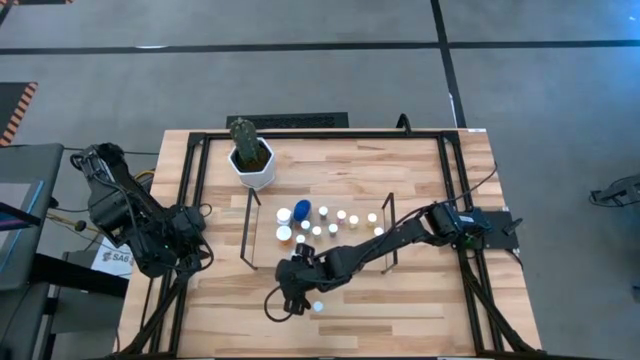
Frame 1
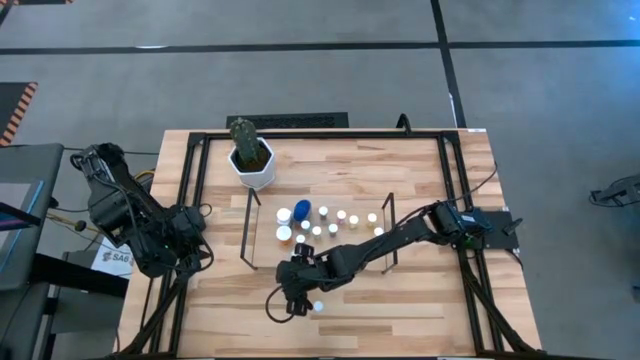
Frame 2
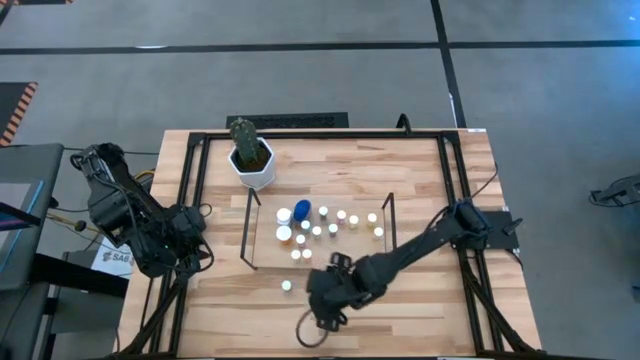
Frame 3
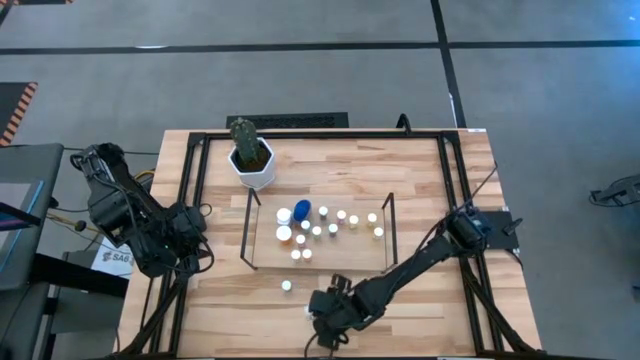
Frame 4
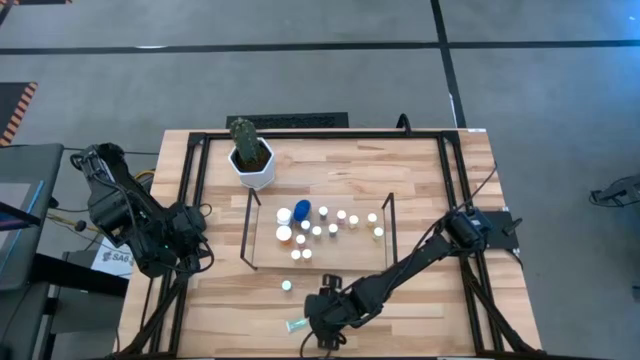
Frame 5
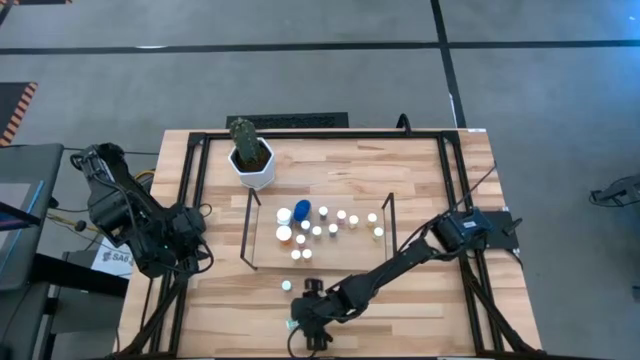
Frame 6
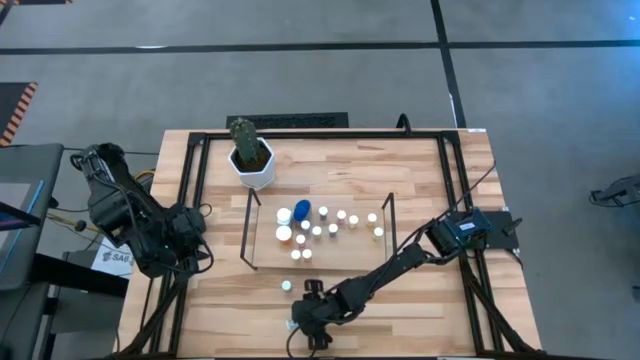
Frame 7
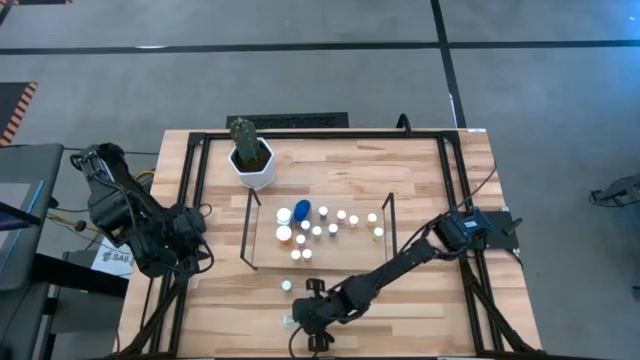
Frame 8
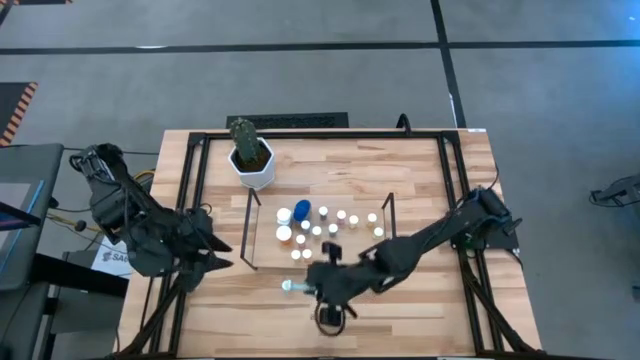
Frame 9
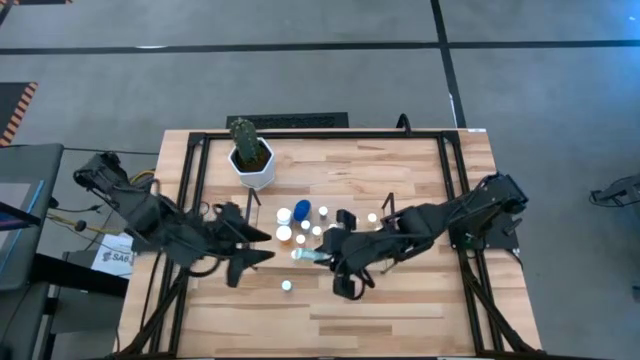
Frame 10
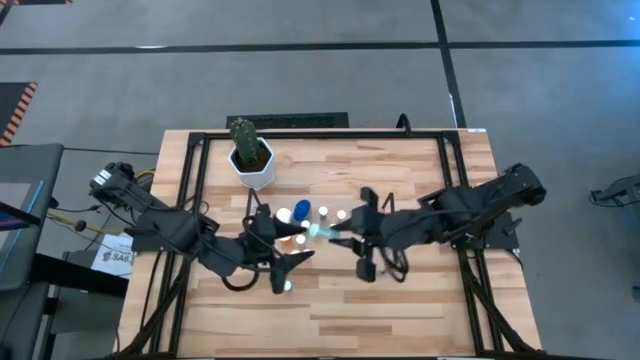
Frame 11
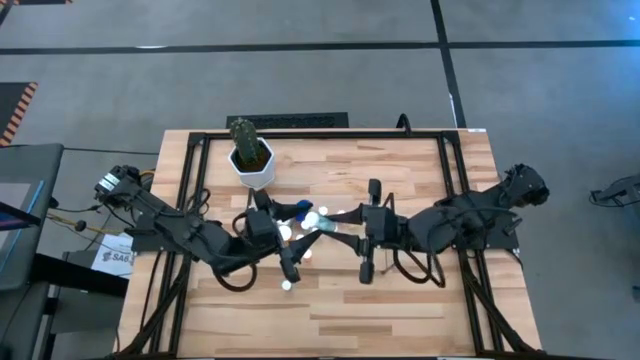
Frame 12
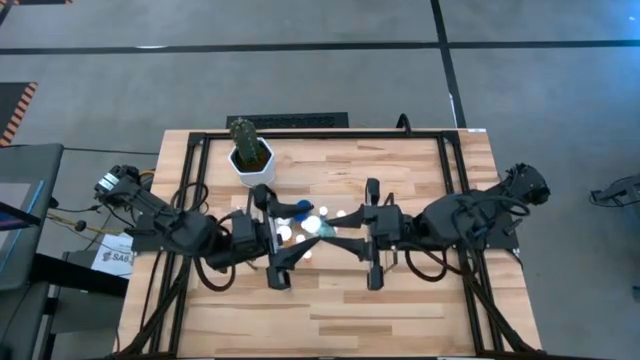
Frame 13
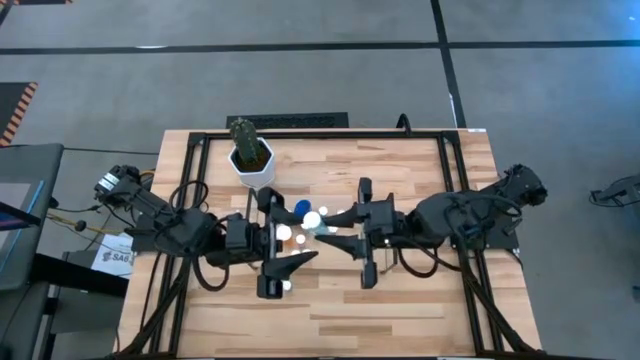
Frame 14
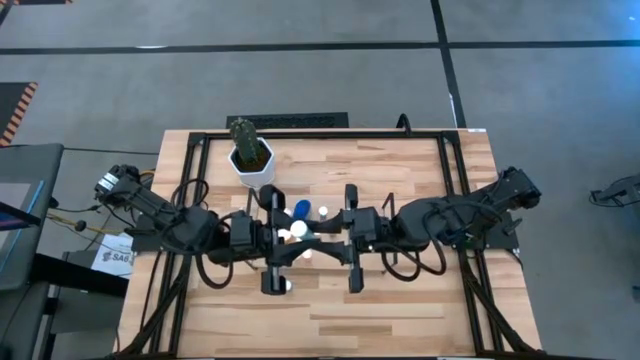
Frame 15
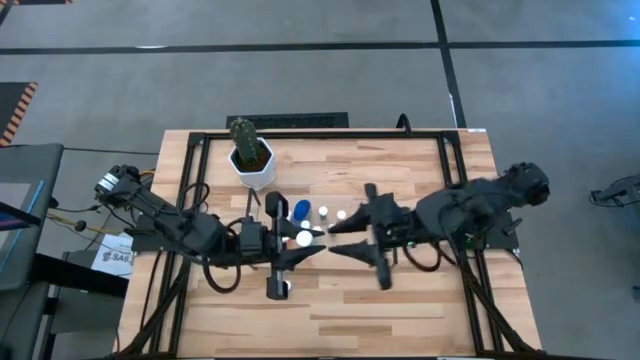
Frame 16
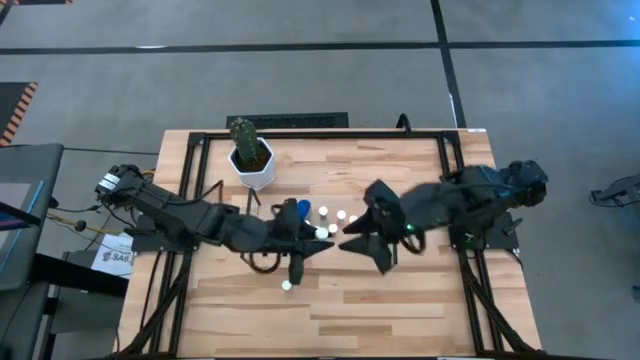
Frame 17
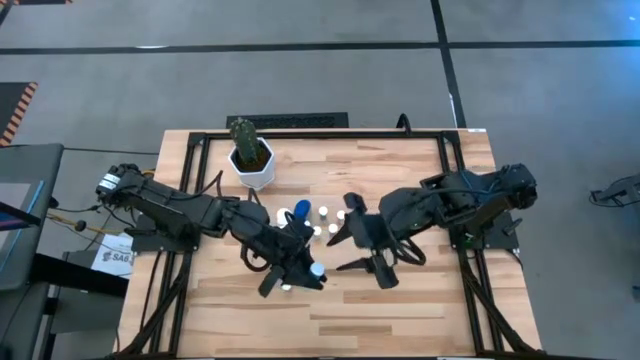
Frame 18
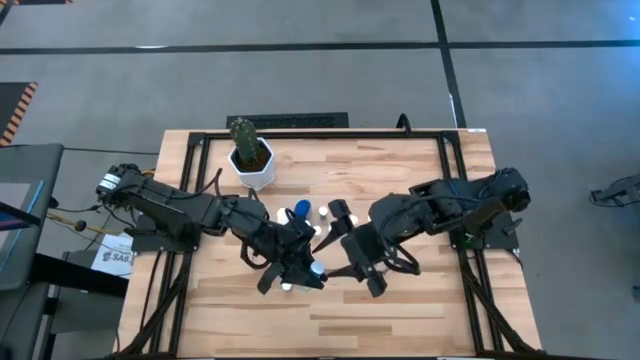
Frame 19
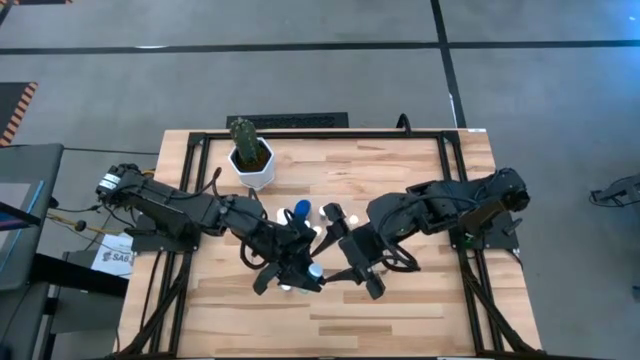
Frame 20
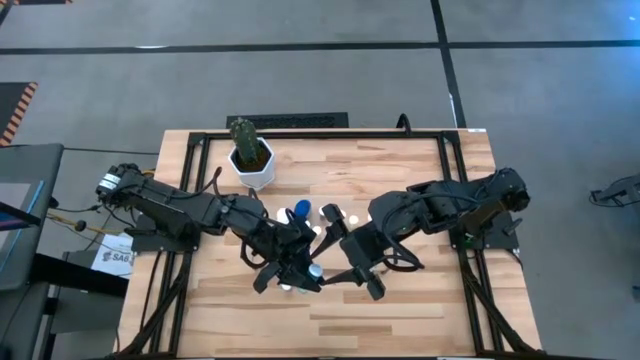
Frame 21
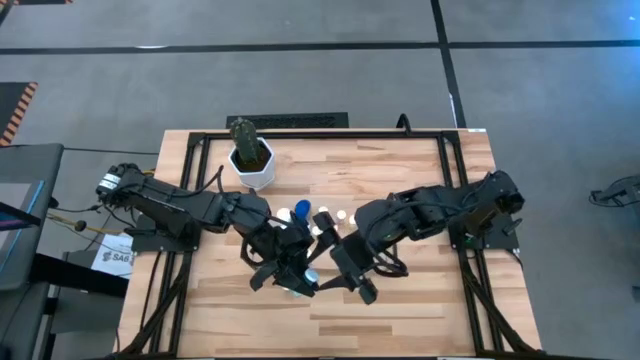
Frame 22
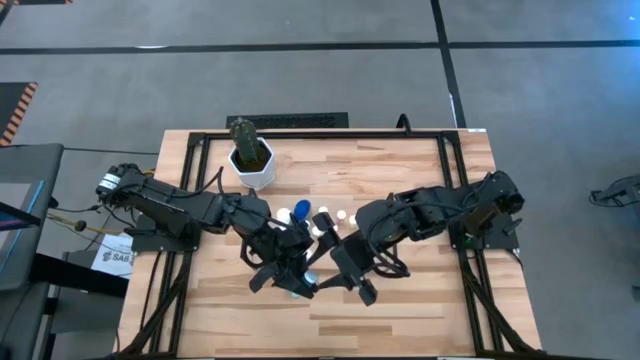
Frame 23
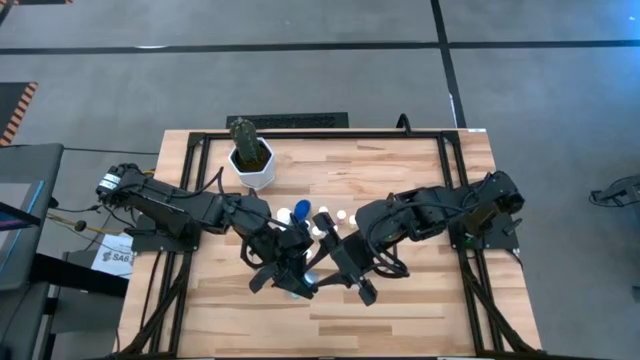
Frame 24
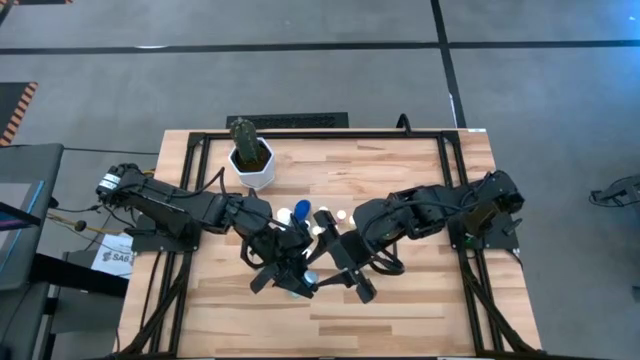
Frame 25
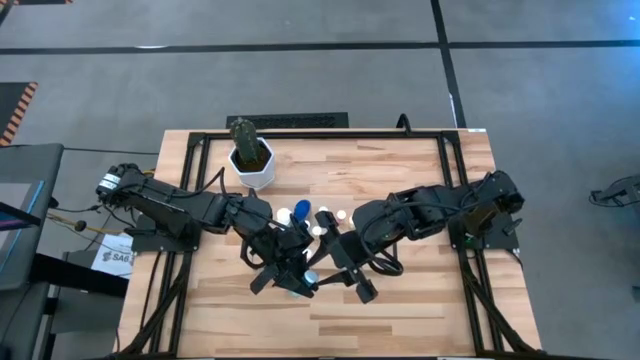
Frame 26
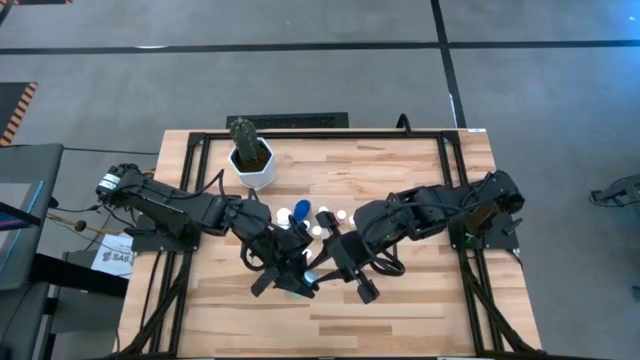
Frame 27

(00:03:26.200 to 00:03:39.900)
Task: Pick and place medicine bottles onto shelf by color
Put the blue pill bottle on the shelf

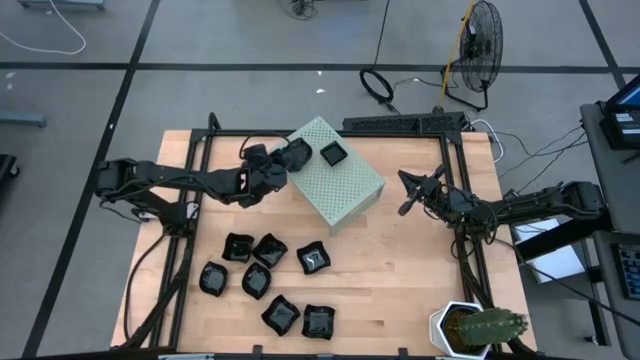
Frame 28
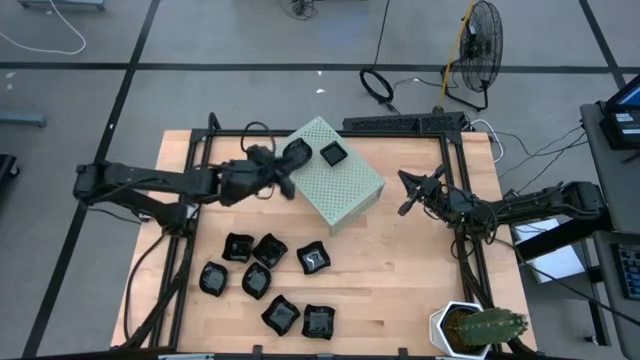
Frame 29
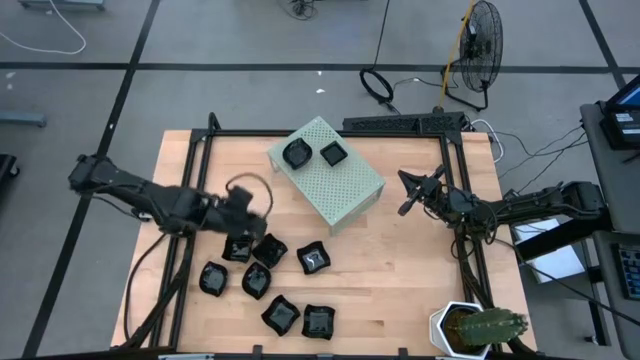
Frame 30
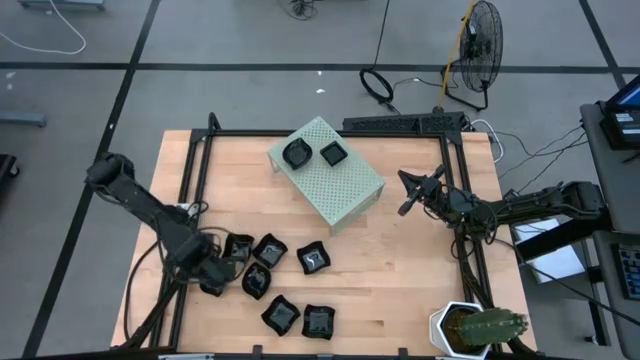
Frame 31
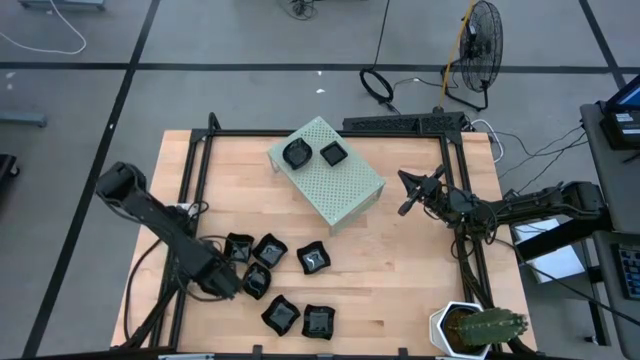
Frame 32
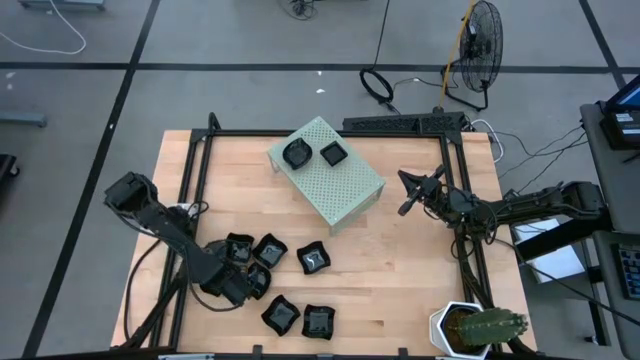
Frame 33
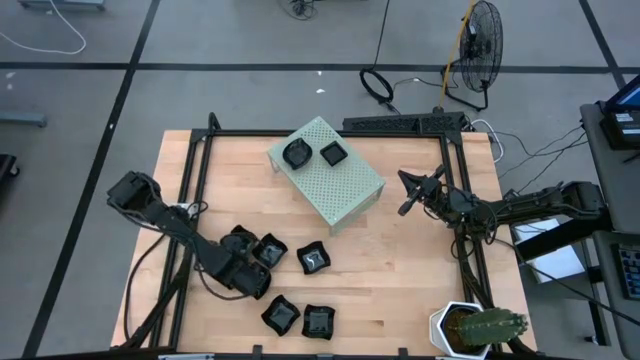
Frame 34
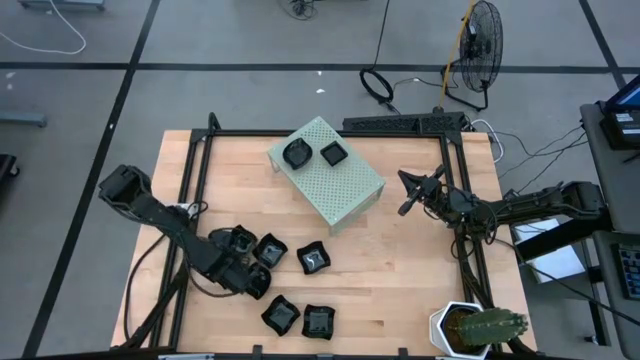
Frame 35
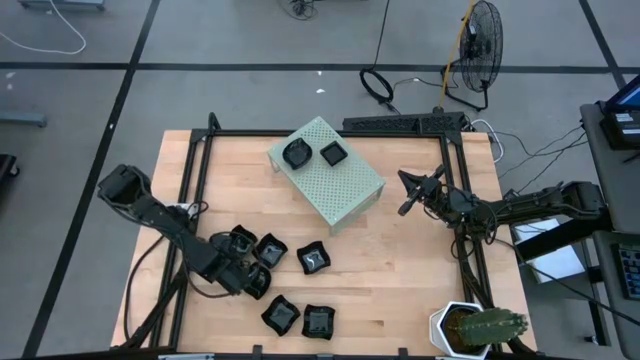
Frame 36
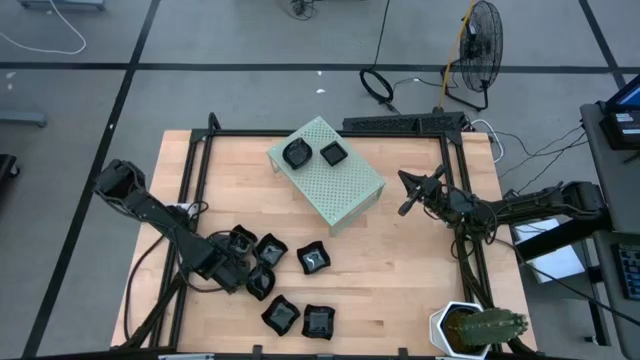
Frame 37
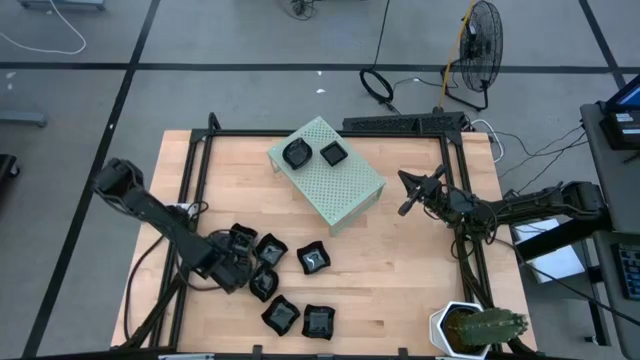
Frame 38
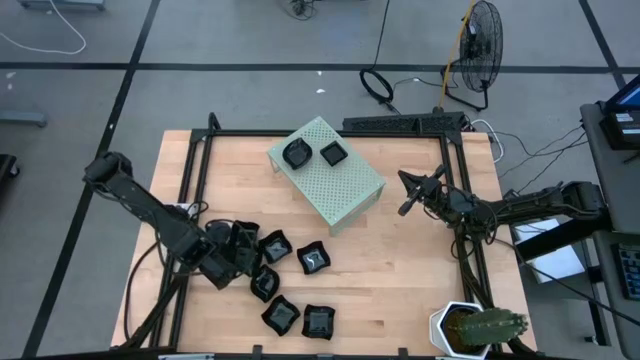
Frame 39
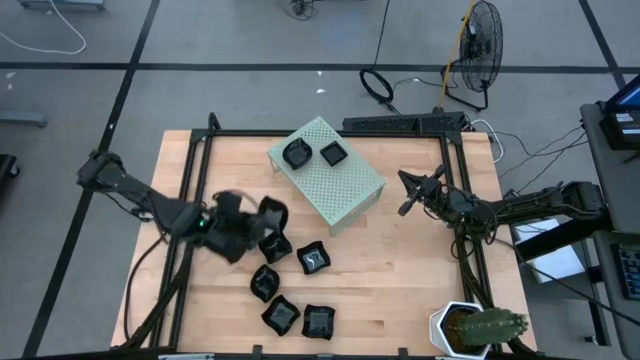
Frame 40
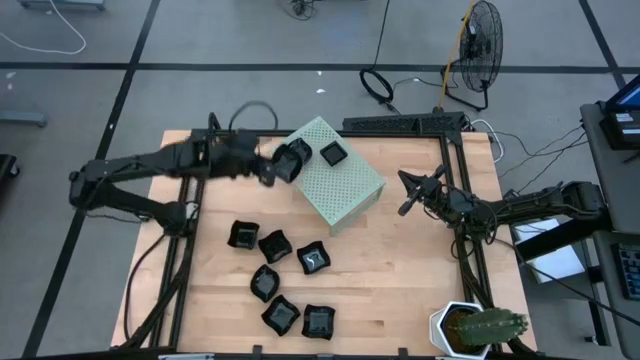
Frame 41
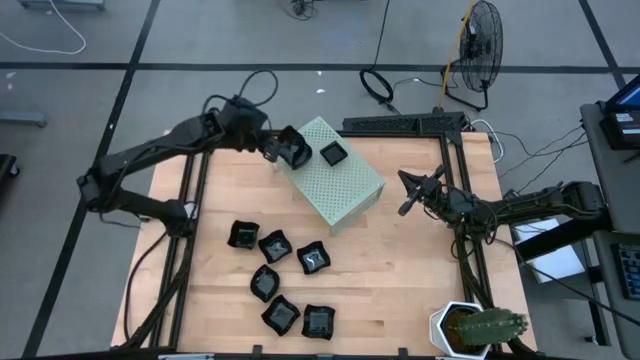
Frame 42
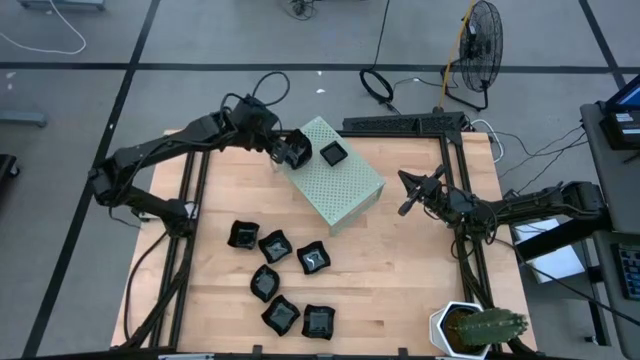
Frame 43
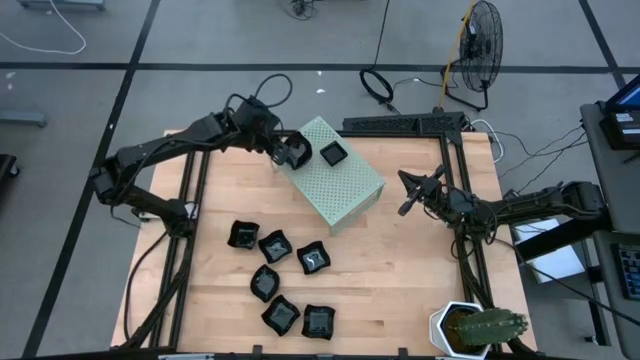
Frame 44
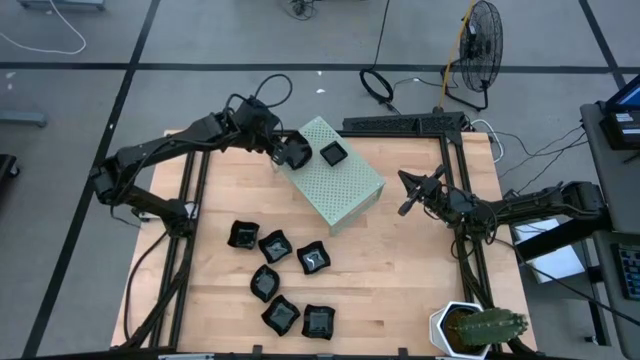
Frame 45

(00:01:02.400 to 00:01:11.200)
Task: Pick & Place Mini shaped plates
Stack the leaf-shaped plate on top of the other leaf-shaped plate on the shelf
